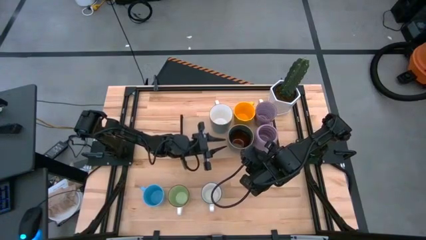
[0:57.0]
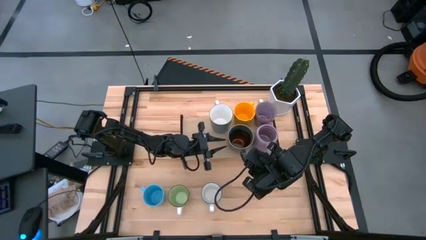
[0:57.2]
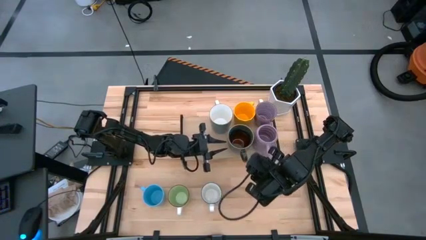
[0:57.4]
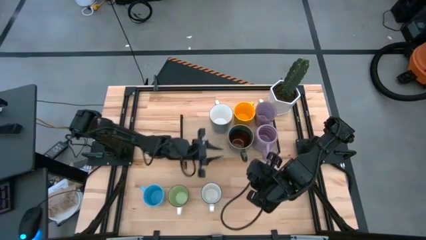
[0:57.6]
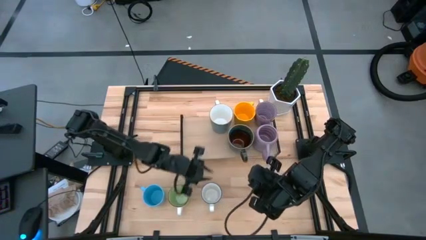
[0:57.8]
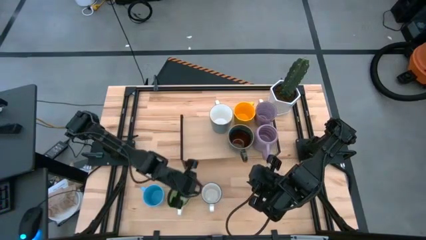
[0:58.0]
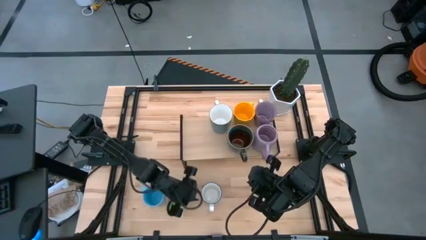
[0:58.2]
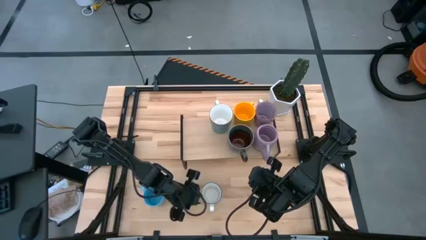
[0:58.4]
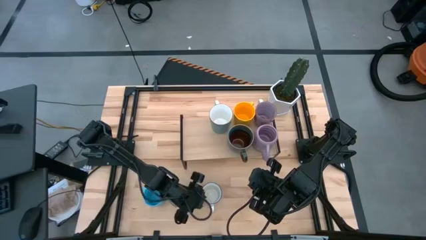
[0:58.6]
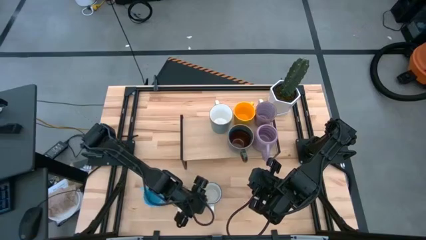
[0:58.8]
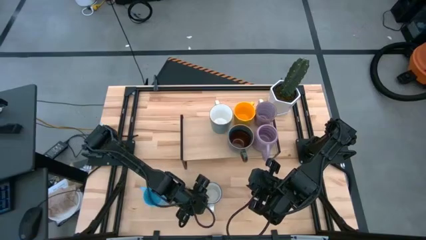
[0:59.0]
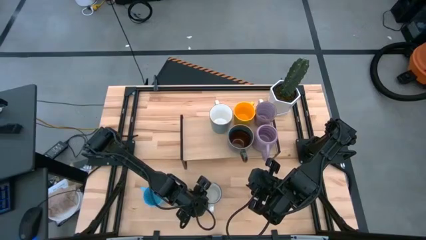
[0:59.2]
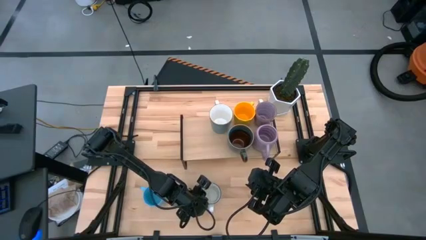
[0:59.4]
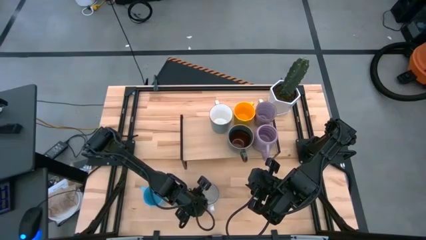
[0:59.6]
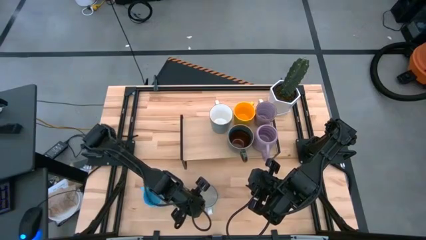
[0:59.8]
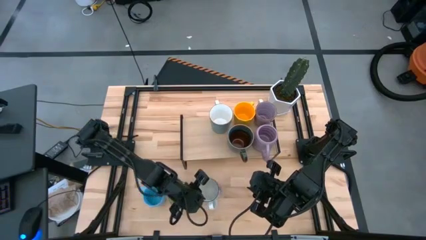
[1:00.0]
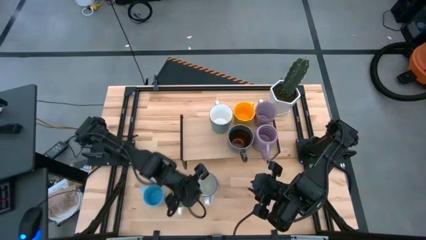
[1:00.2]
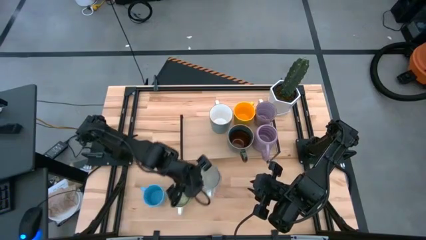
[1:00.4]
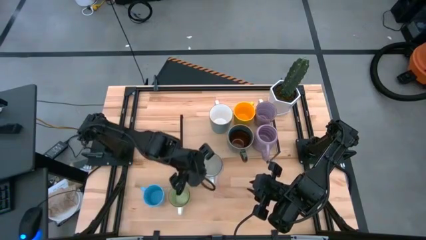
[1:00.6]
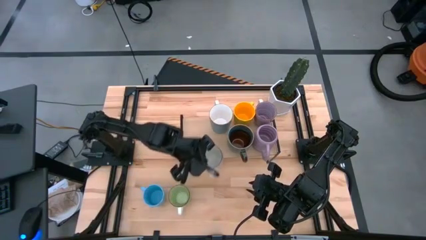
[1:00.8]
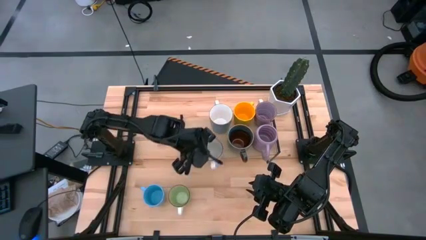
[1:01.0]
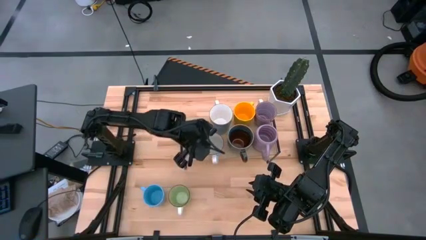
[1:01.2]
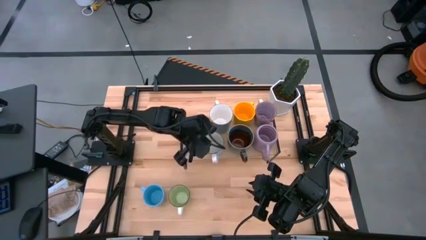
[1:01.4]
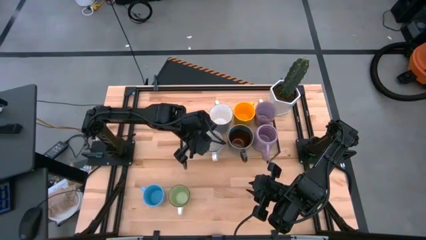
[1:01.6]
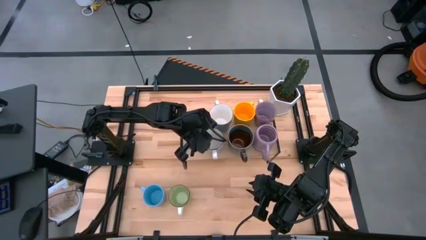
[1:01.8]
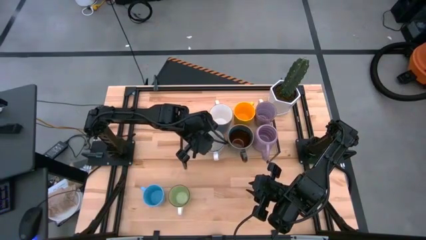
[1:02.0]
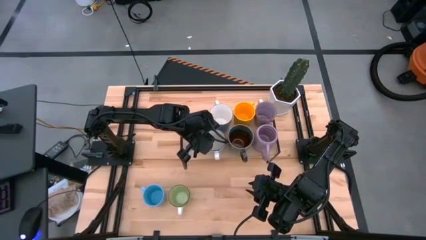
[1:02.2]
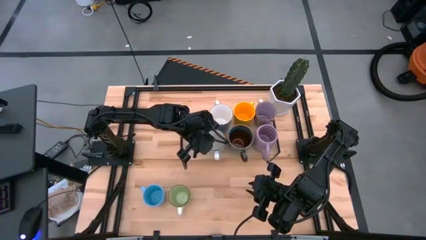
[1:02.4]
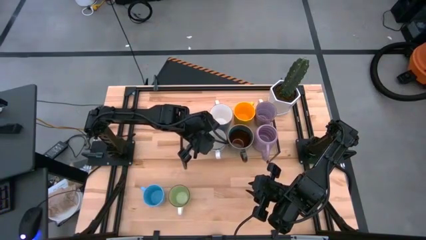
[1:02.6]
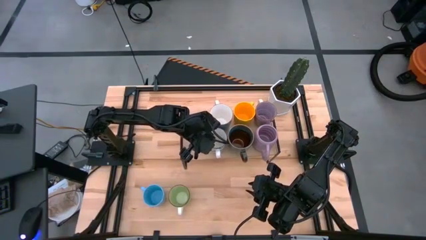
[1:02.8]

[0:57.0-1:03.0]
Task: Place coffee mugs
Put the blue patterned mug on the shelf

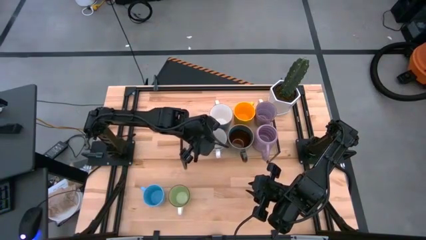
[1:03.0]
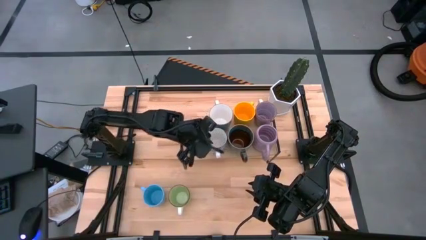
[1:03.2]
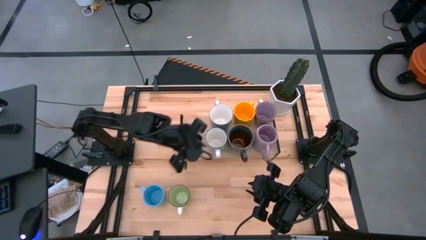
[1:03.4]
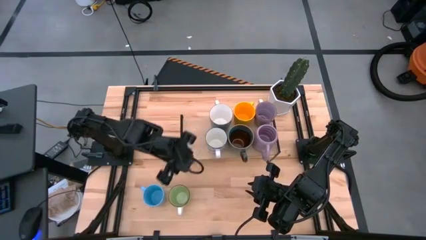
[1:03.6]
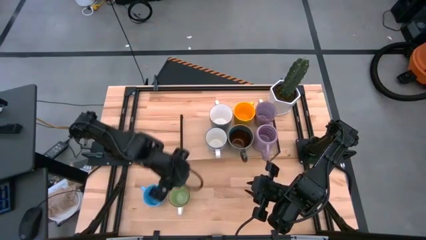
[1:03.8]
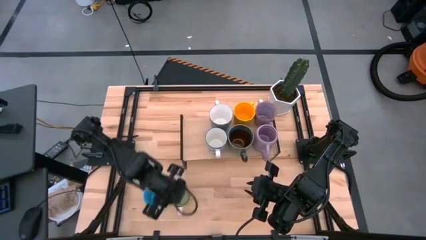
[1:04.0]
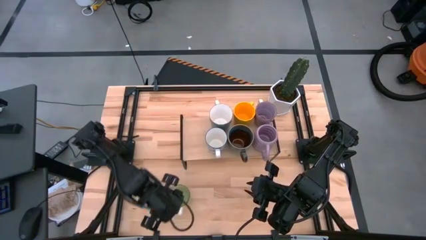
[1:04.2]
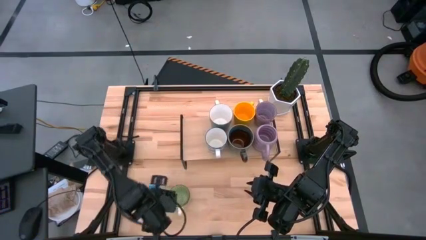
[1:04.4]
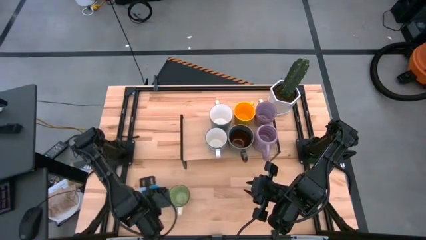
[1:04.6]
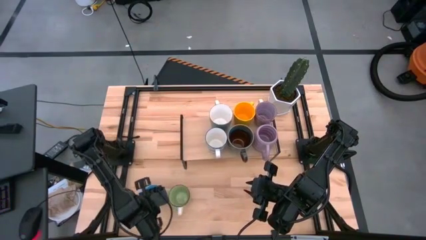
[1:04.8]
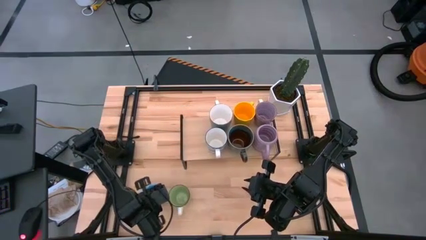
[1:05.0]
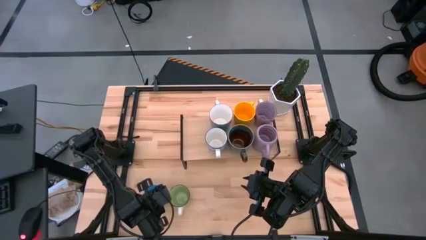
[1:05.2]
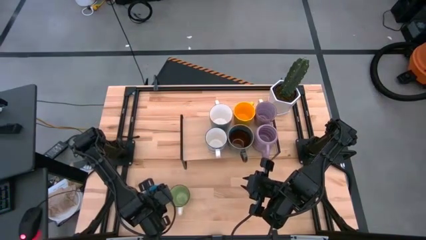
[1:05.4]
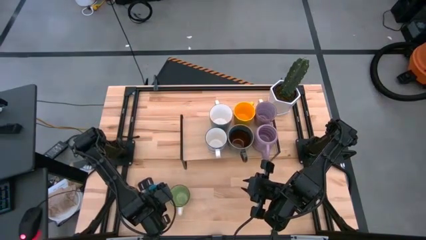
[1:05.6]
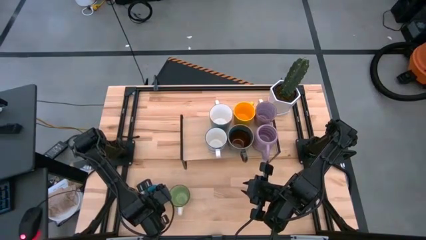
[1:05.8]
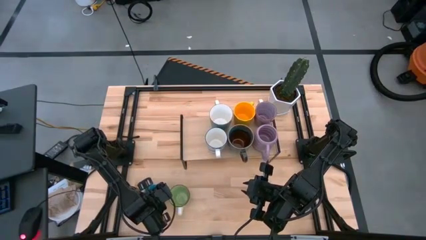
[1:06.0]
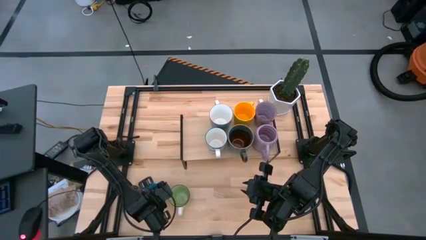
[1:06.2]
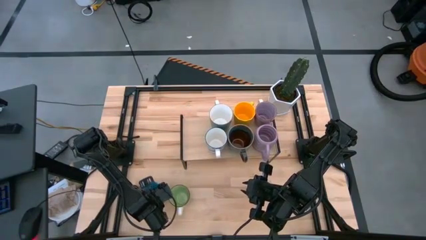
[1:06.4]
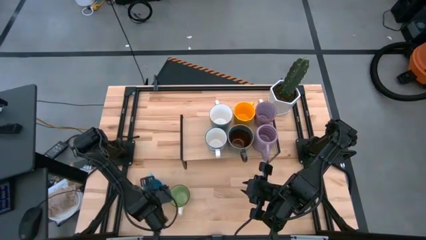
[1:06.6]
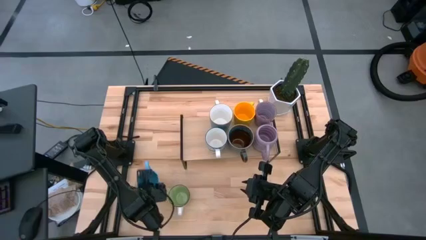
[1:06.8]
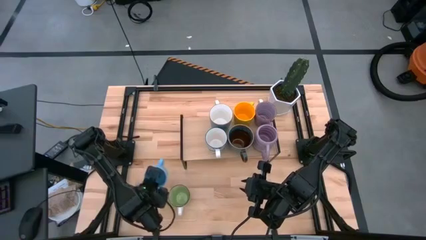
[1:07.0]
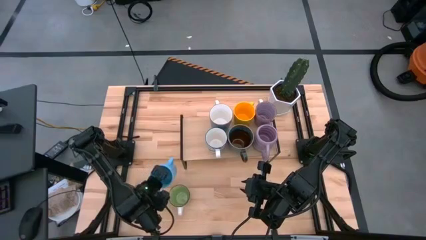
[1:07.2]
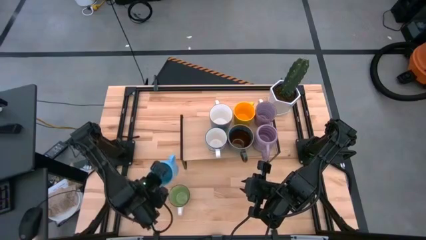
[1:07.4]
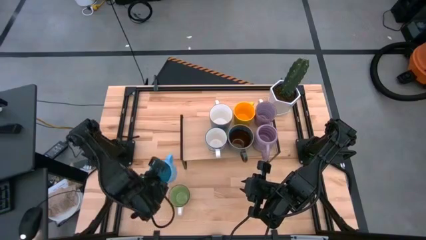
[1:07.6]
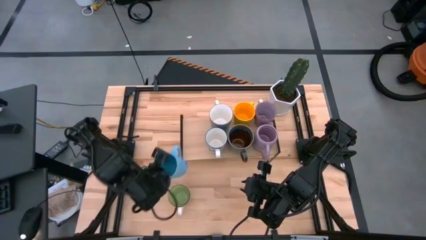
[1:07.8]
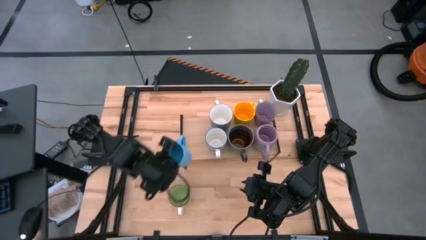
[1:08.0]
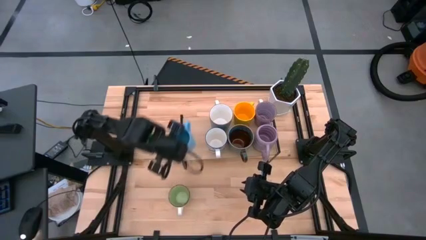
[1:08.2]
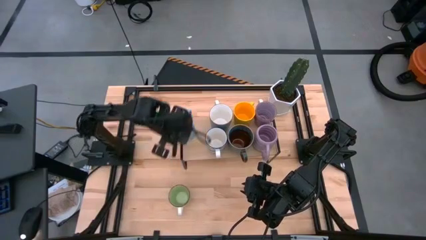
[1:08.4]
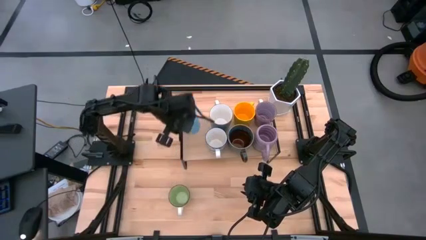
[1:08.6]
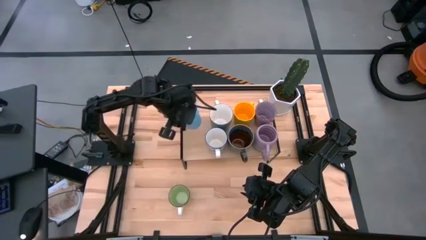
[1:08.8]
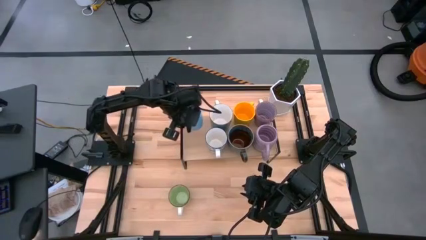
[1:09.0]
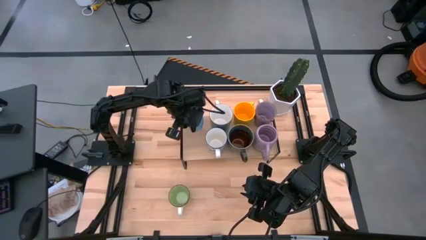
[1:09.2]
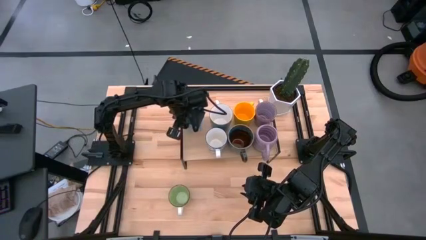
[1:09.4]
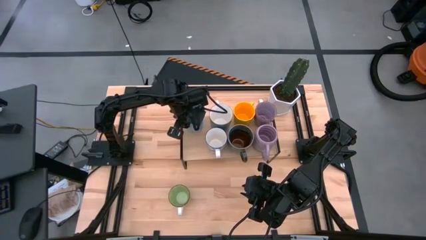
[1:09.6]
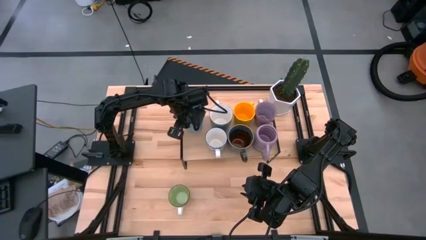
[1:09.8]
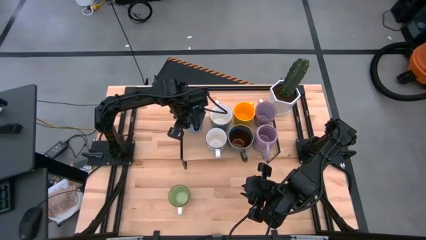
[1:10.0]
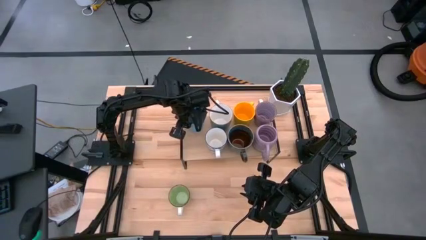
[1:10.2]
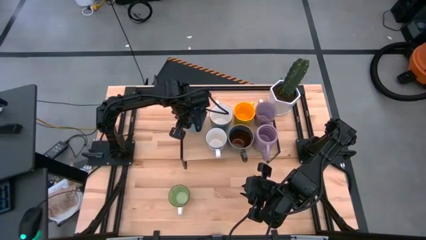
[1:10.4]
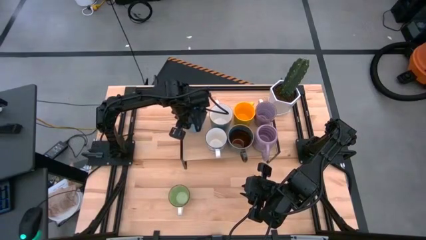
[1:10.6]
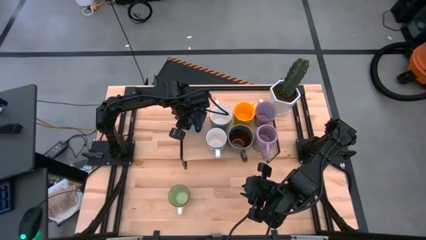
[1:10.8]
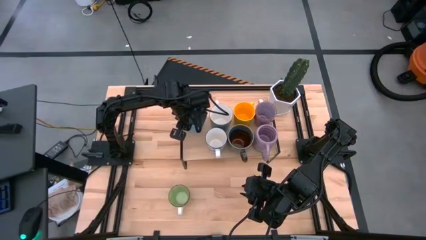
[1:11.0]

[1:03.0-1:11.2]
Put the light blue mug on the shelf

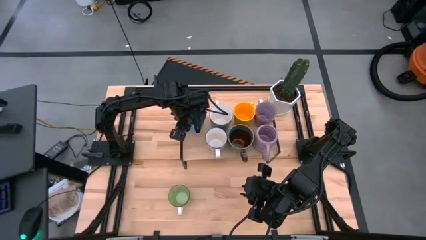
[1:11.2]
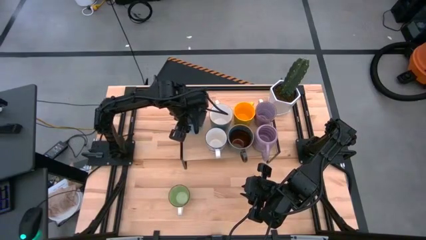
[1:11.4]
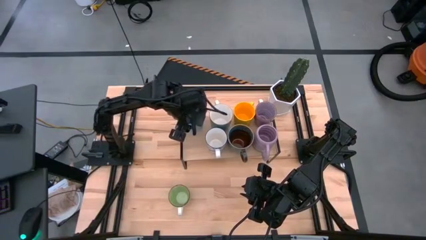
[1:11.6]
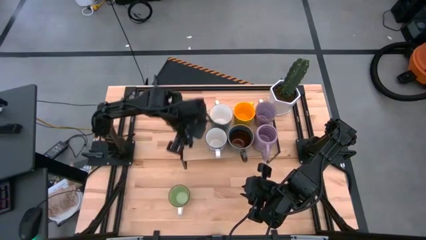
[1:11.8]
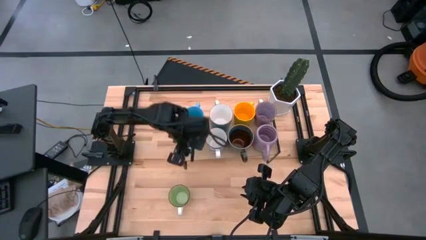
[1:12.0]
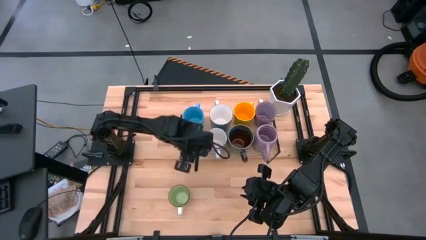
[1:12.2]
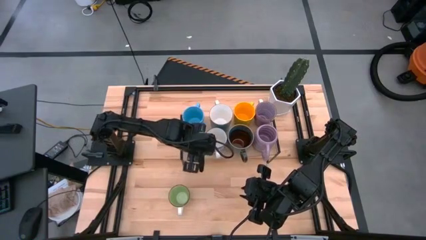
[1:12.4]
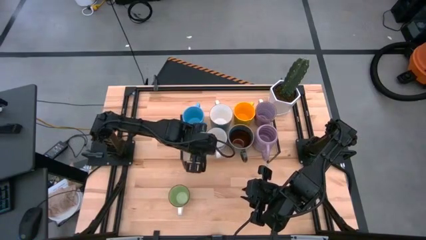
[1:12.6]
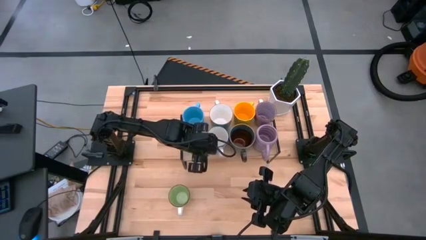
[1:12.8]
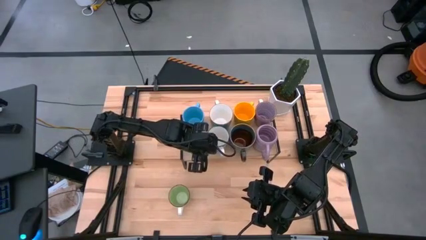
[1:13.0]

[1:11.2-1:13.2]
Adjust the blue patterned mug on the shelf
